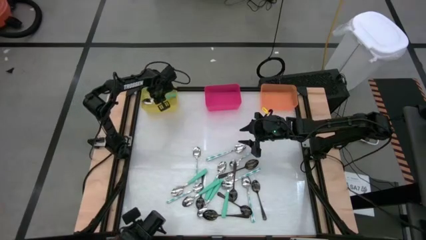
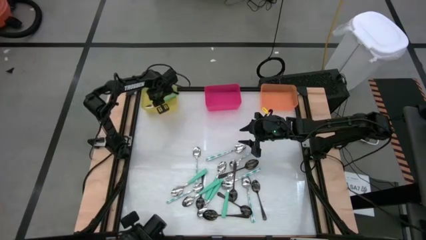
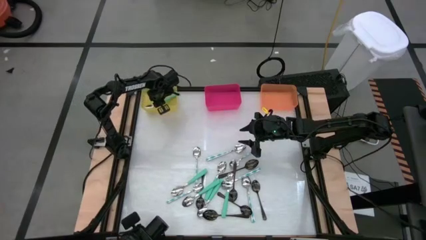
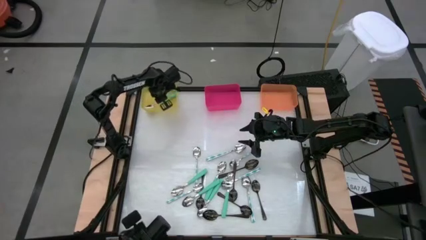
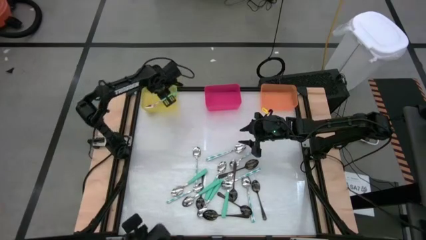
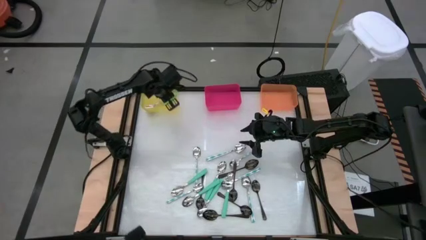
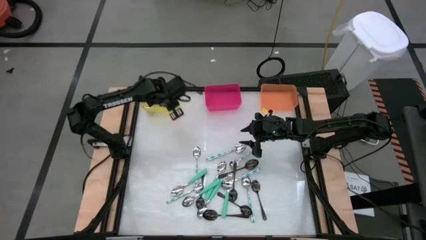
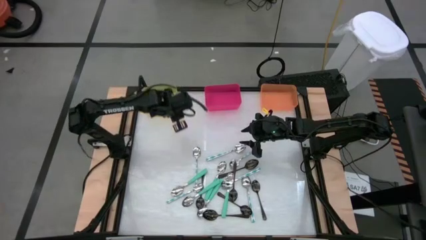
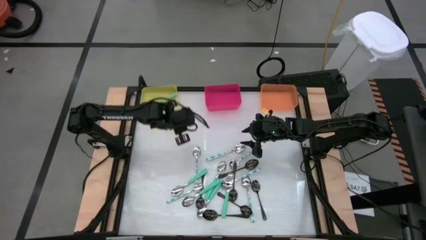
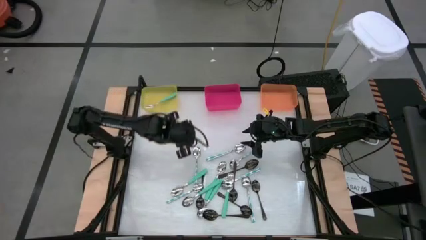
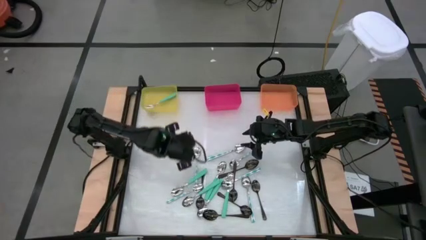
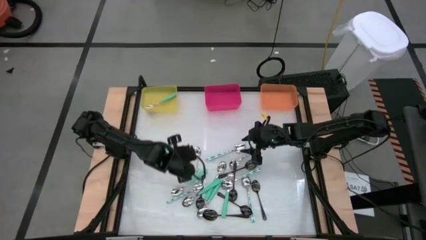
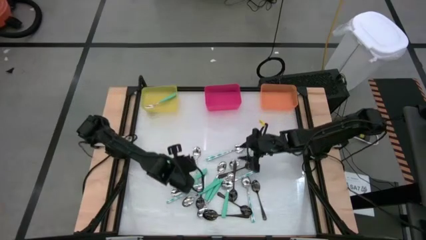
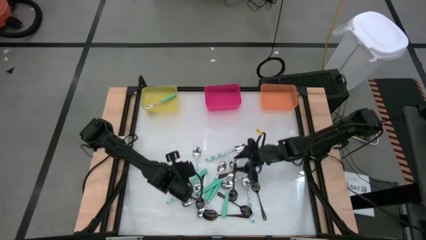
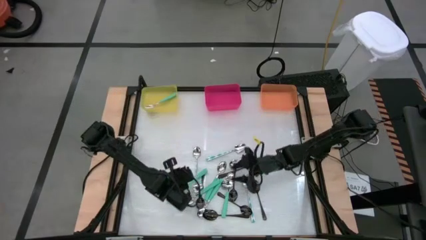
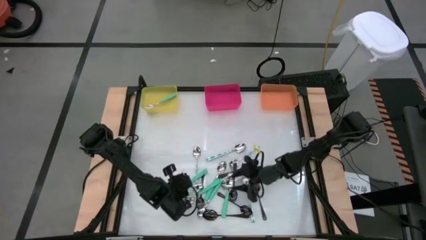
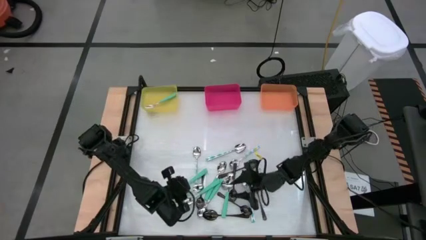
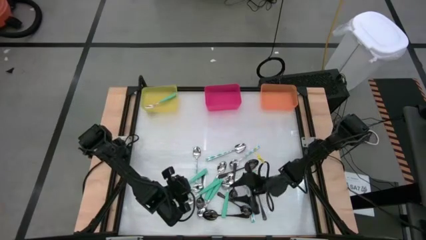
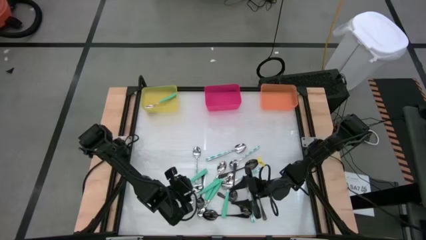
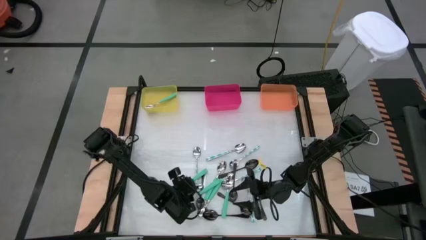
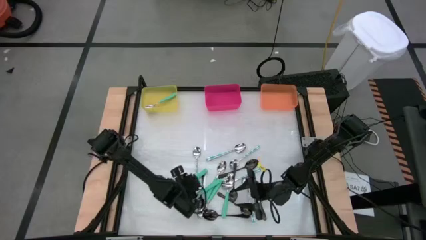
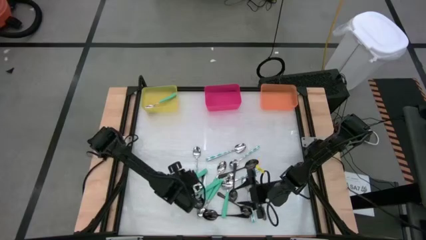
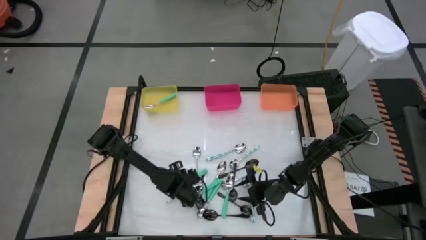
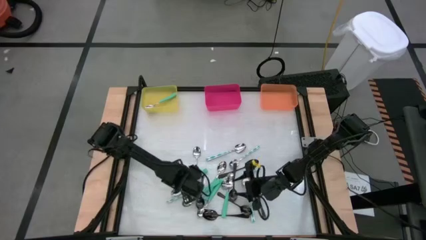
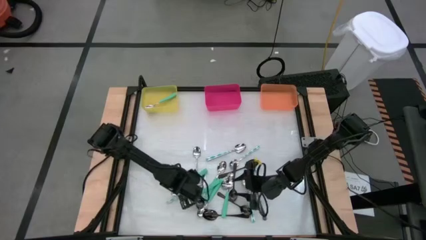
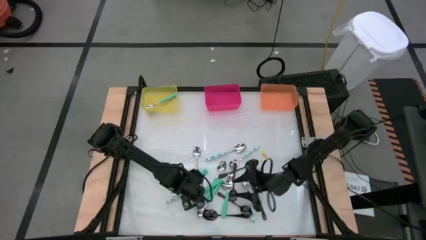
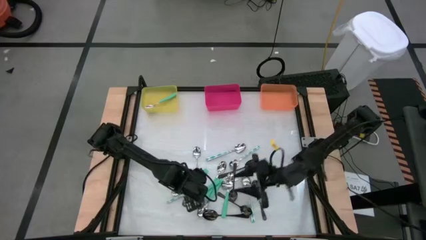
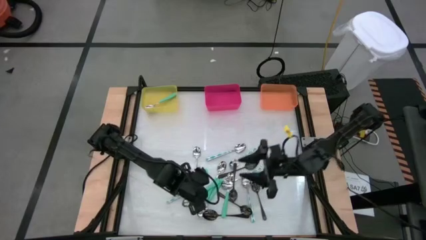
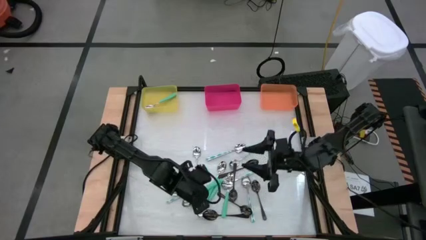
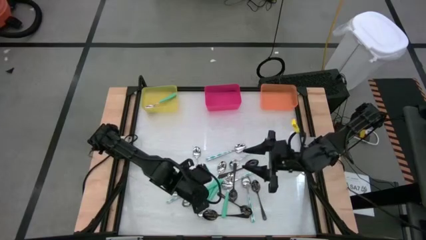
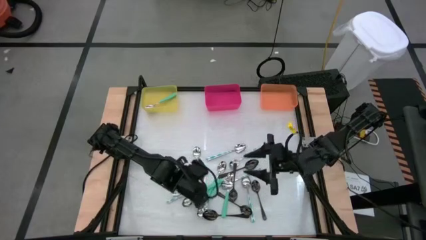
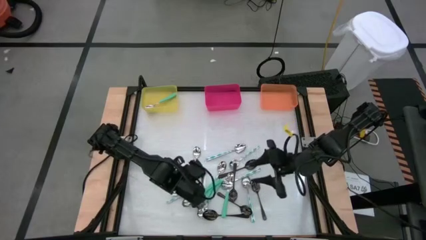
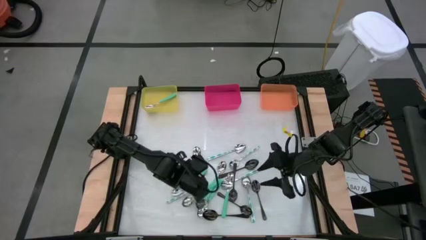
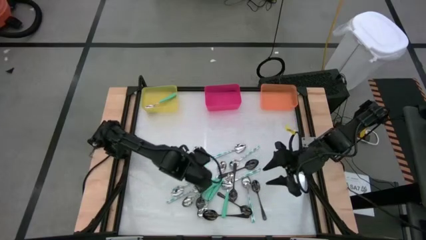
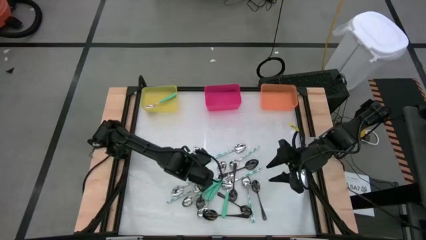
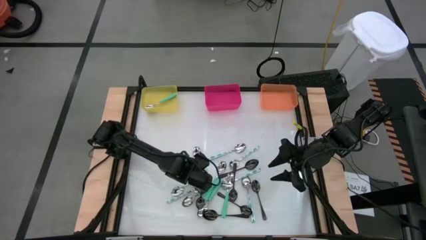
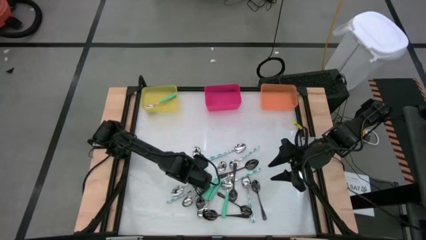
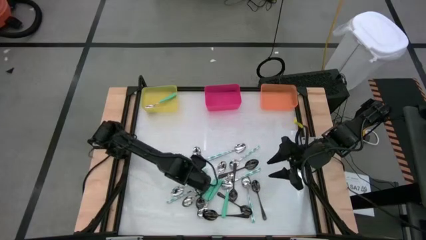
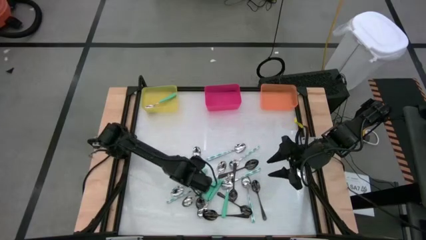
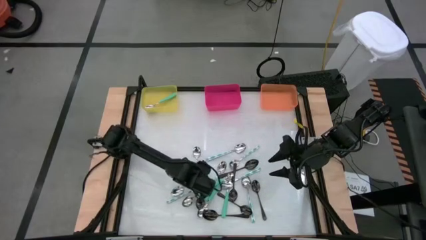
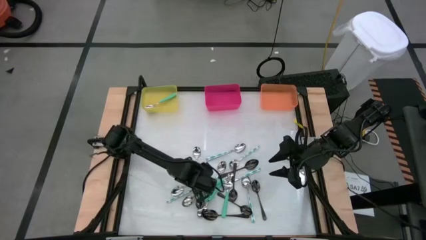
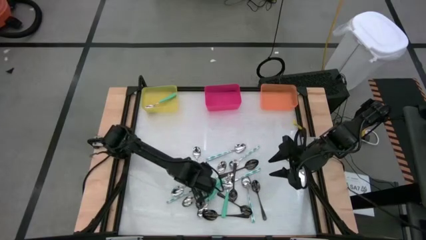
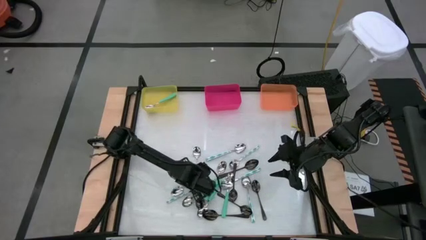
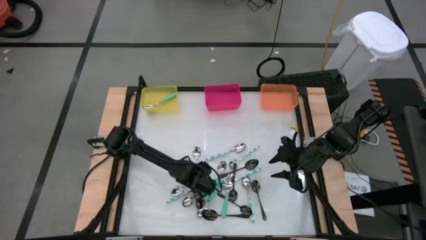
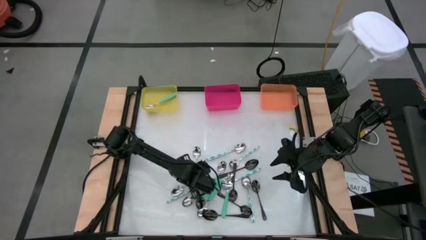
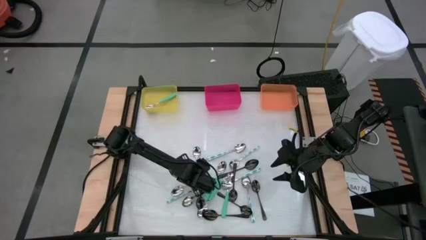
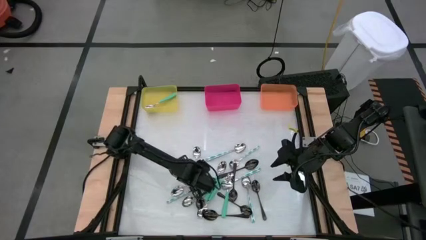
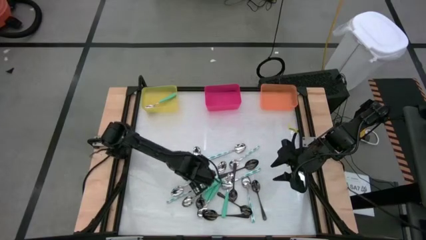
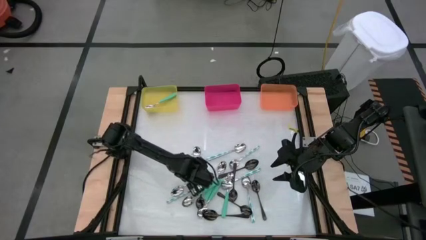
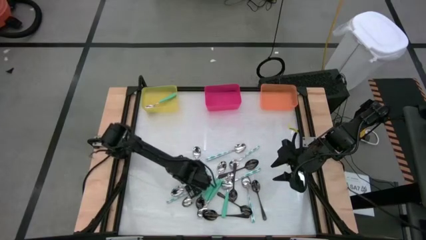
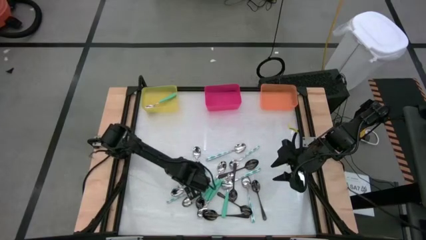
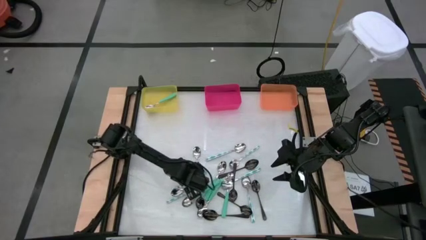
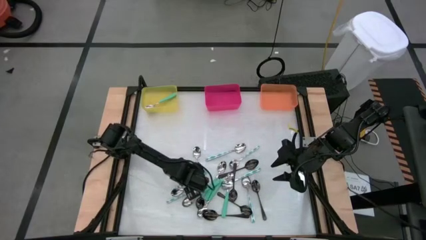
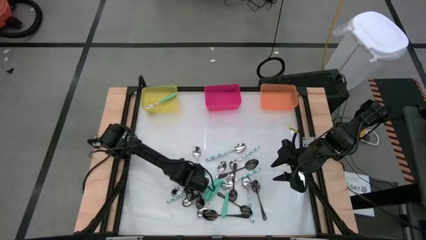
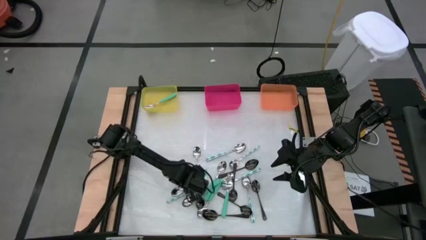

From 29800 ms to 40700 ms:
Task: Sort silverware by color (type)
Put the light green spoon into the yellow bin
